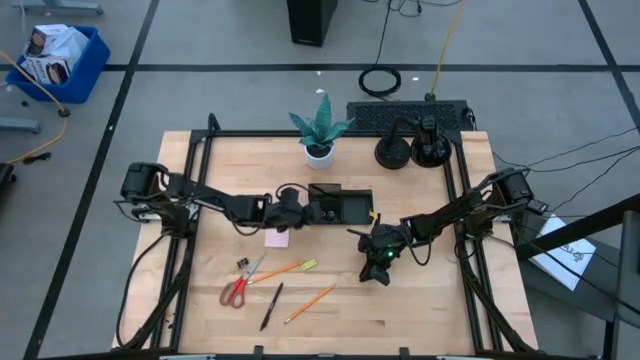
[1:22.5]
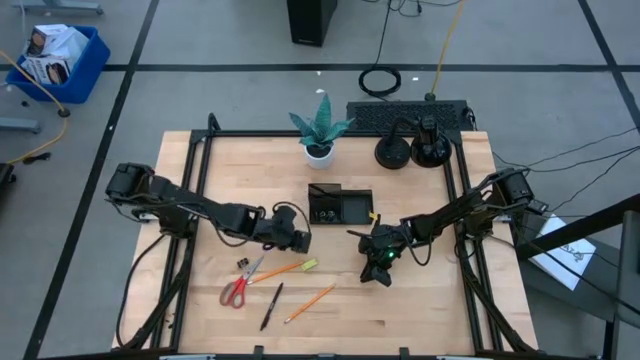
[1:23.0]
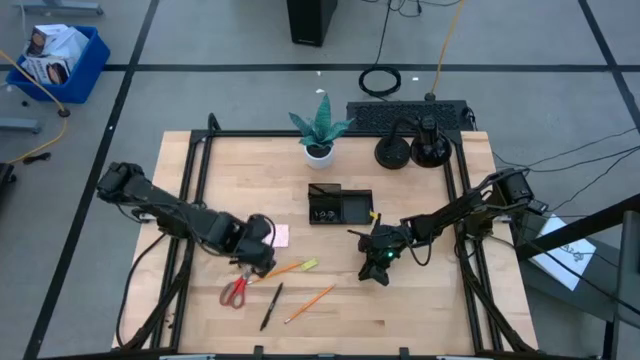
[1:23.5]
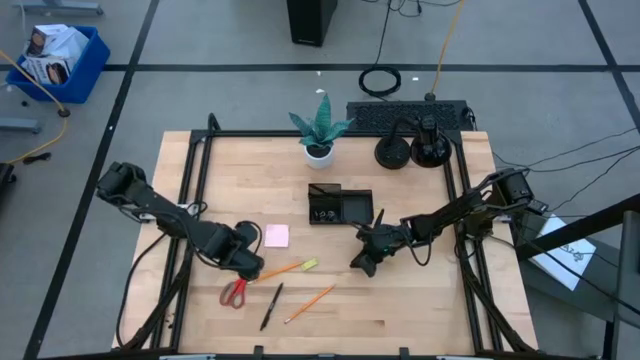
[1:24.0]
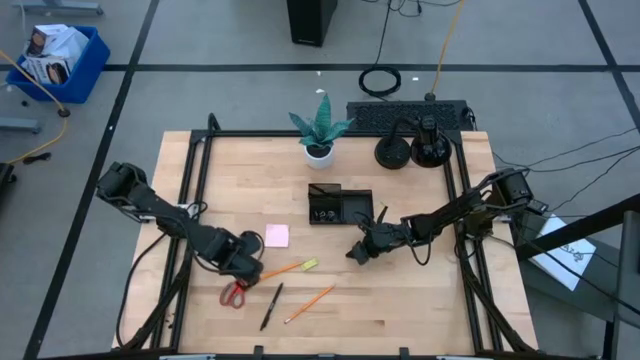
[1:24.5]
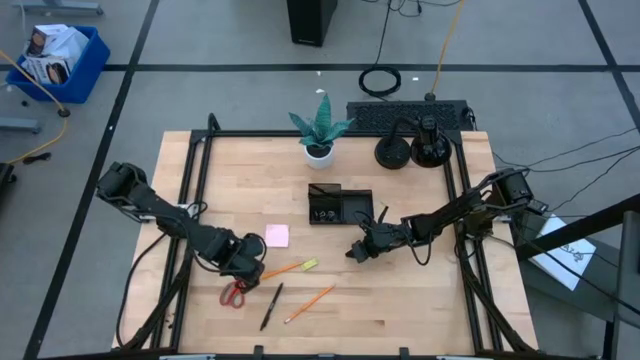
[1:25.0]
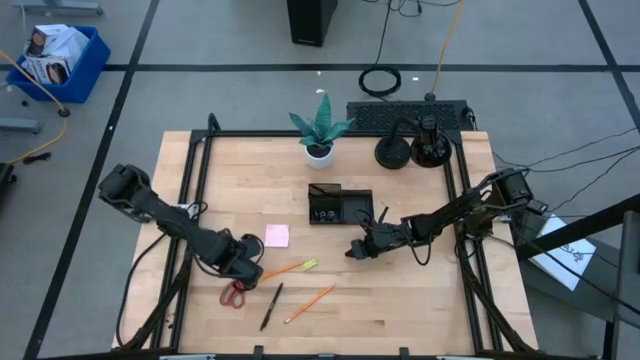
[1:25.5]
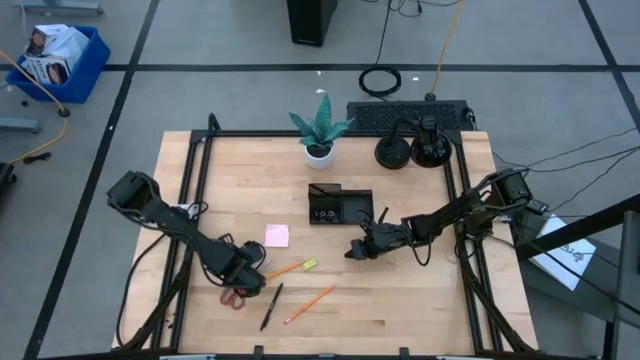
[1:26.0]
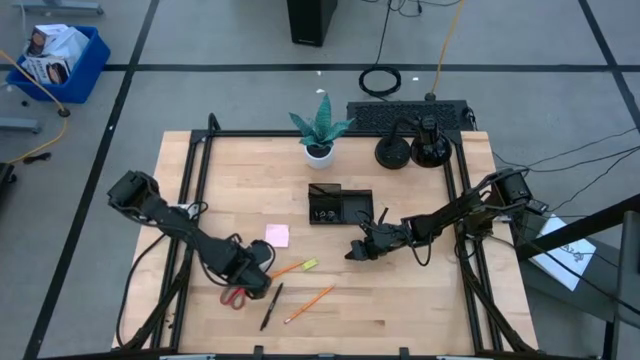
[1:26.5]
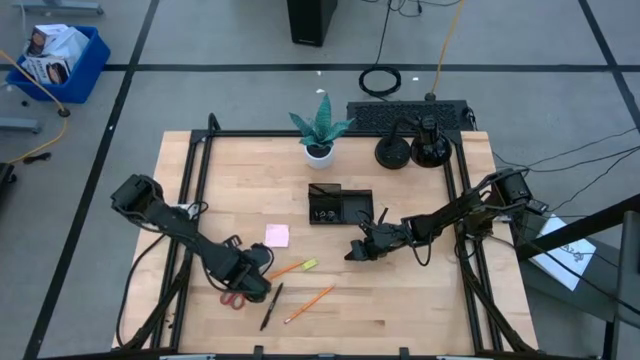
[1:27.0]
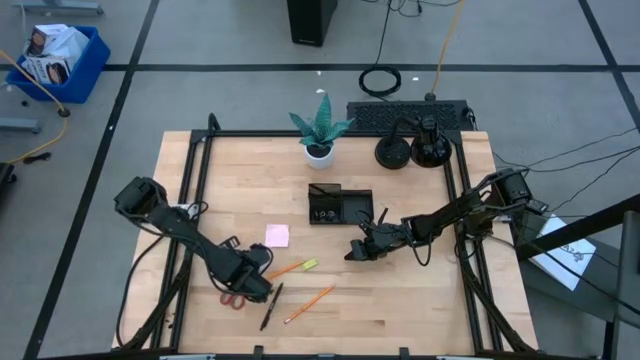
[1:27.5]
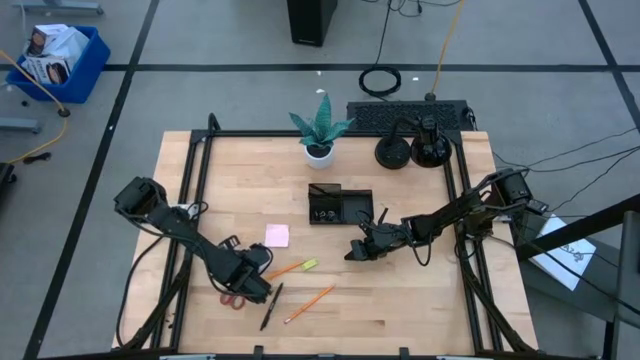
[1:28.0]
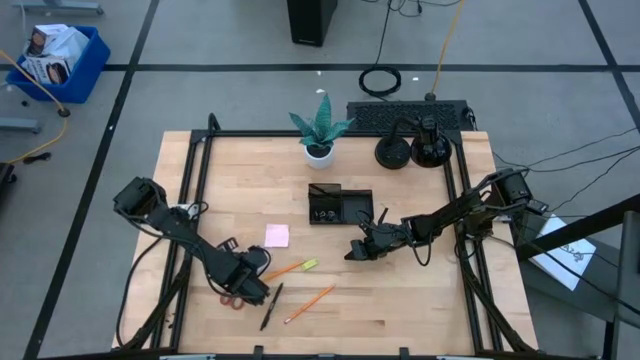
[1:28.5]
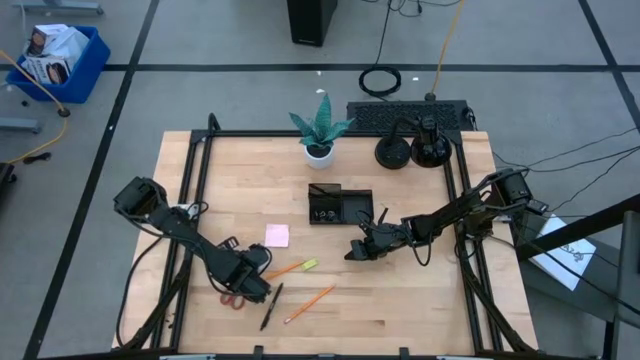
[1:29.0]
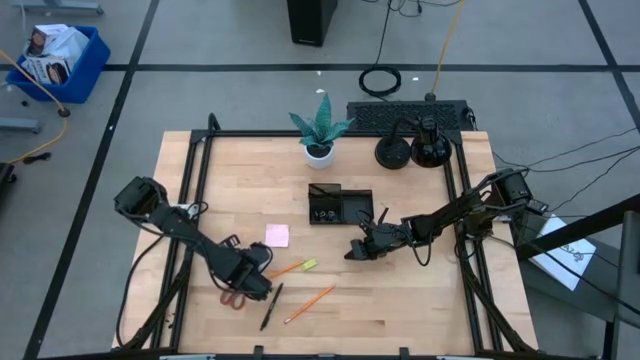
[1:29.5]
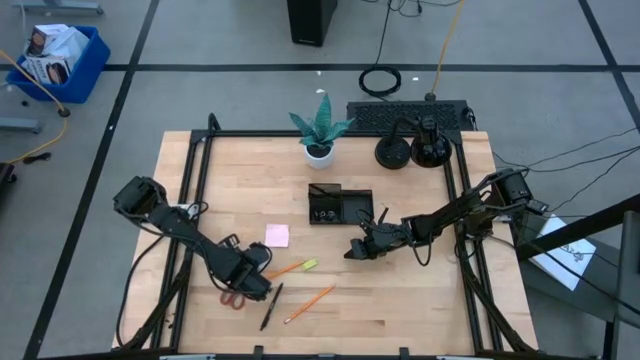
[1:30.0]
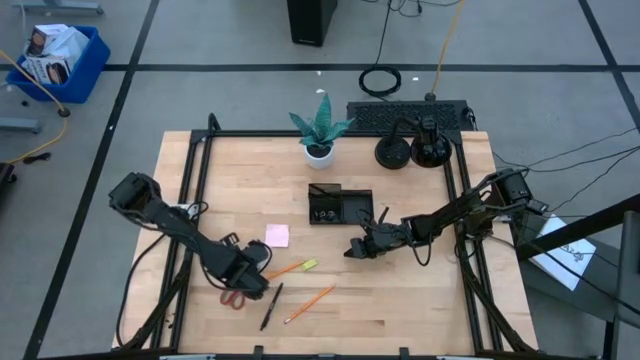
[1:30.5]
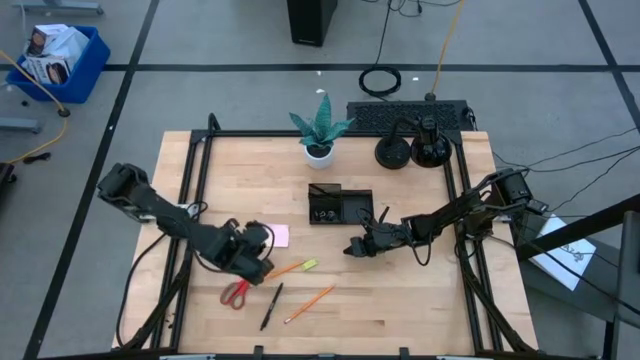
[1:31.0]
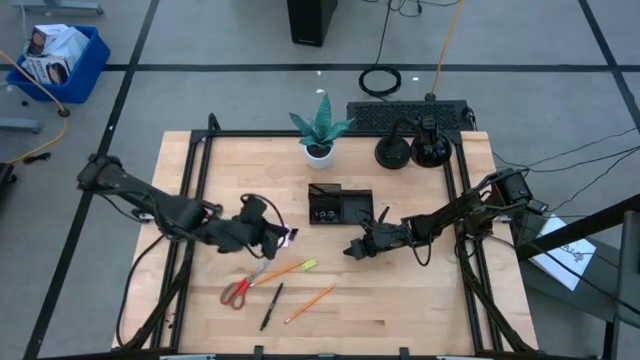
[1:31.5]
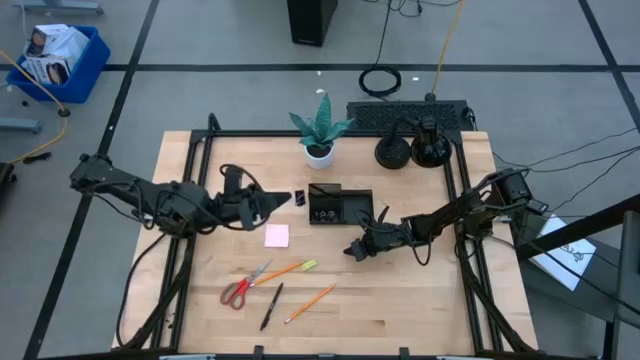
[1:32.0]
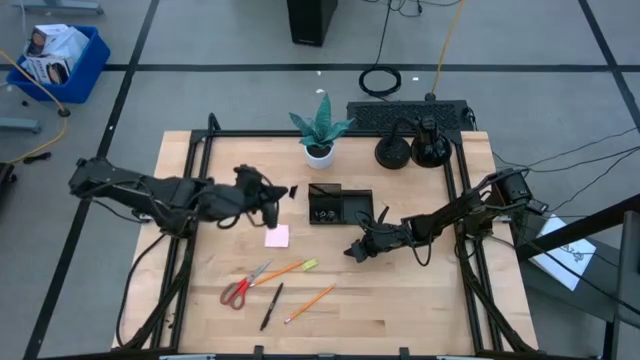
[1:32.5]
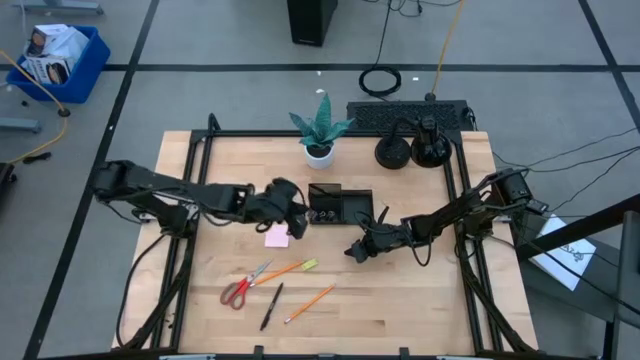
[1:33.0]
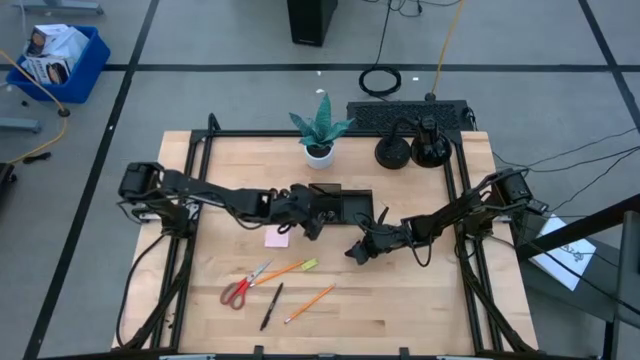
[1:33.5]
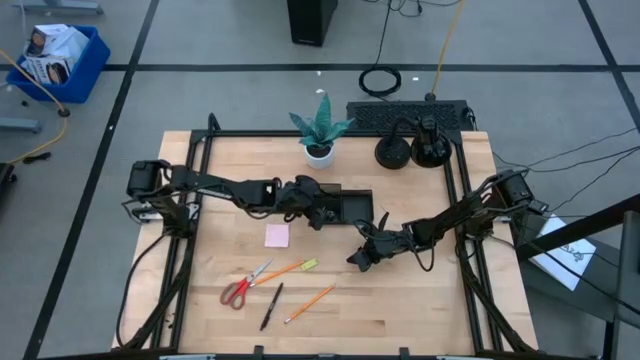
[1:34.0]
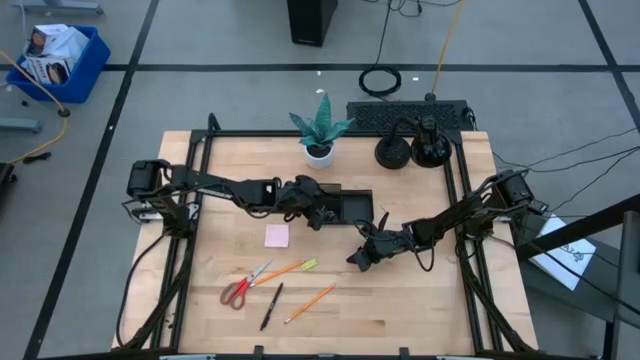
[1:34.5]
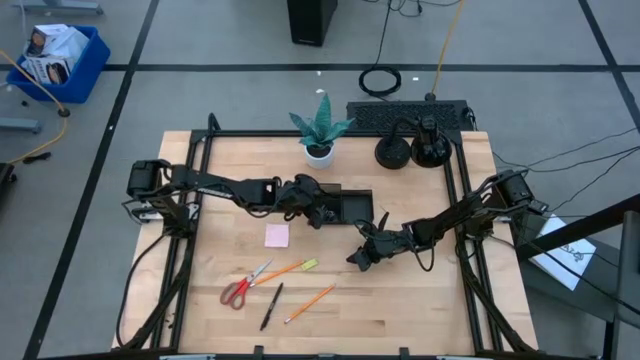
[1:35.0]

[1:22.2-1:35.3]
Task: Pick and place office supplies into organizer
Put the black binder clip into the black desk organizer

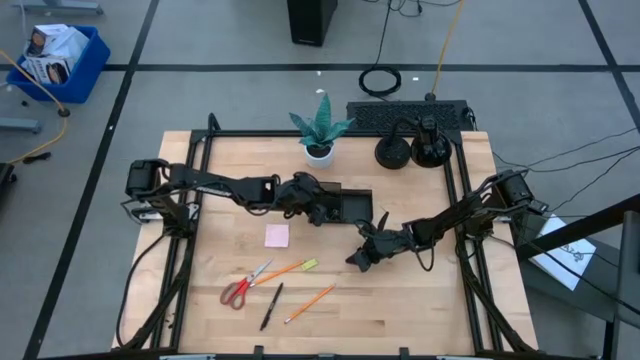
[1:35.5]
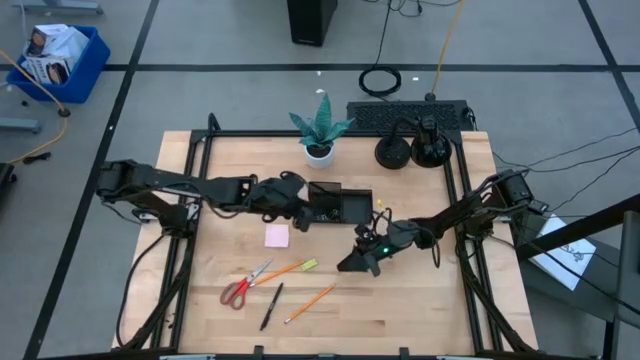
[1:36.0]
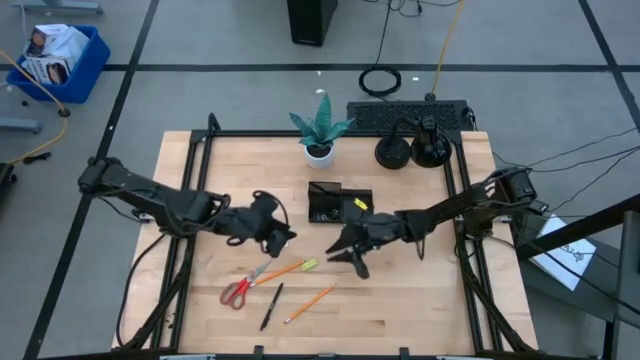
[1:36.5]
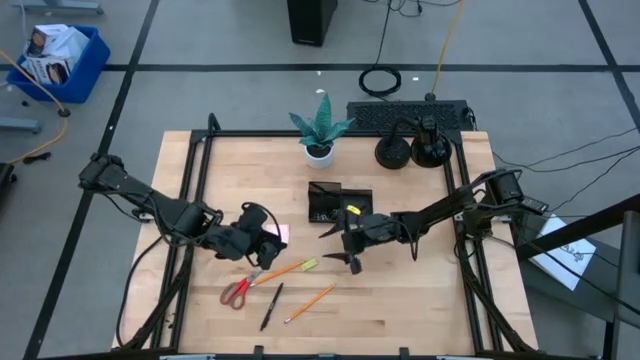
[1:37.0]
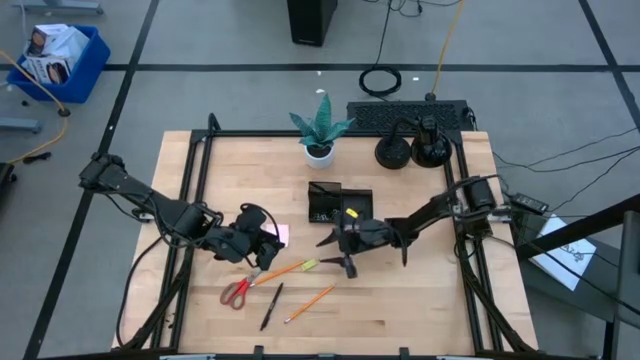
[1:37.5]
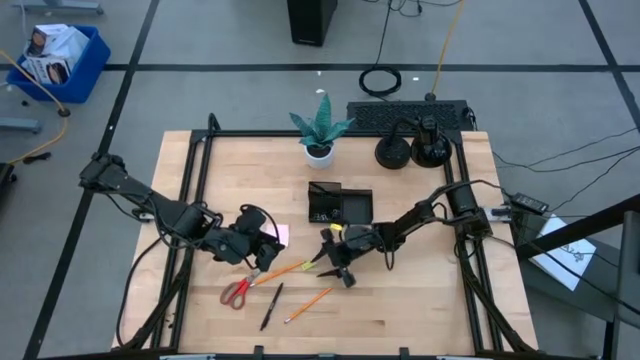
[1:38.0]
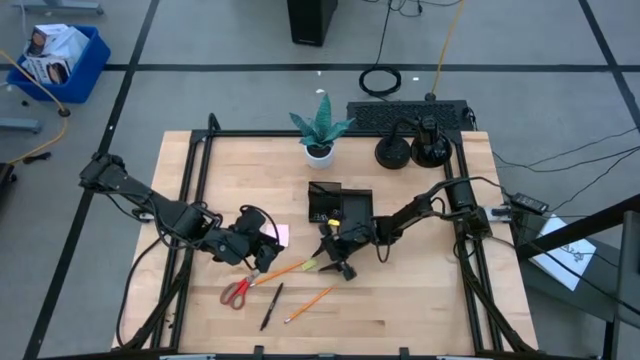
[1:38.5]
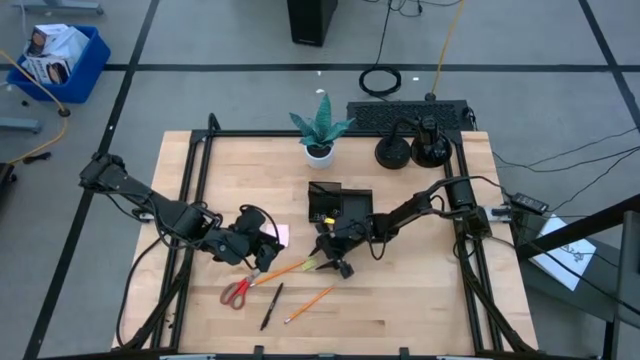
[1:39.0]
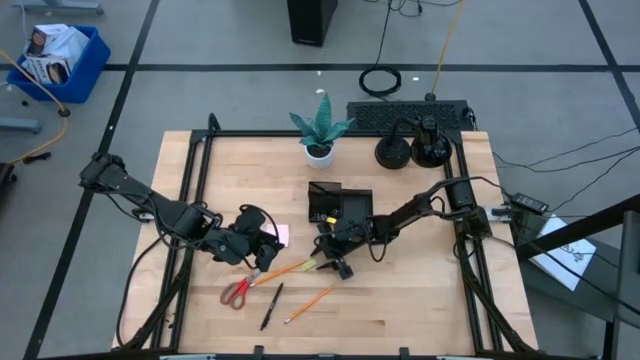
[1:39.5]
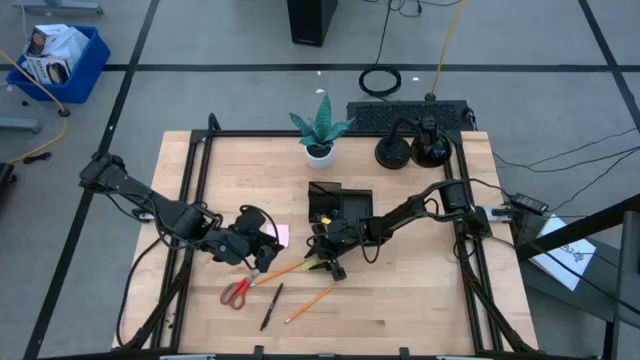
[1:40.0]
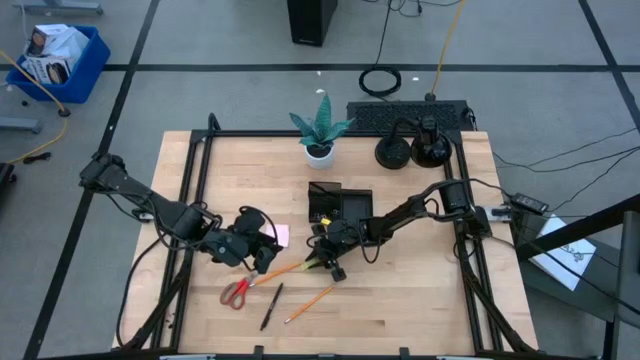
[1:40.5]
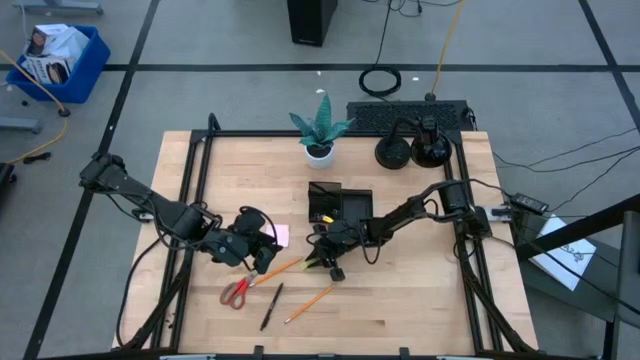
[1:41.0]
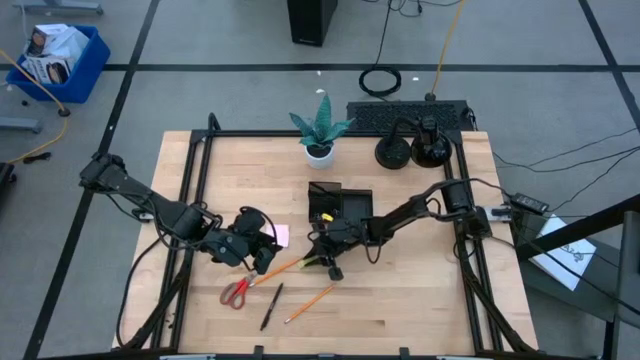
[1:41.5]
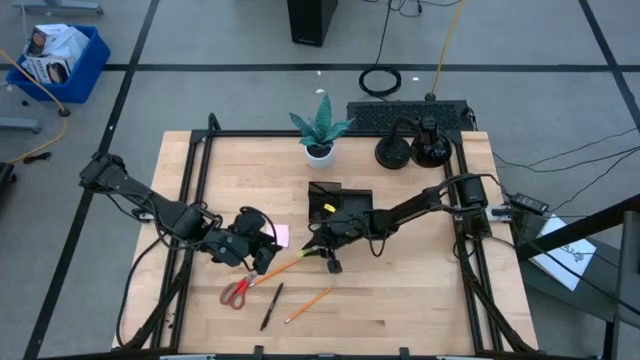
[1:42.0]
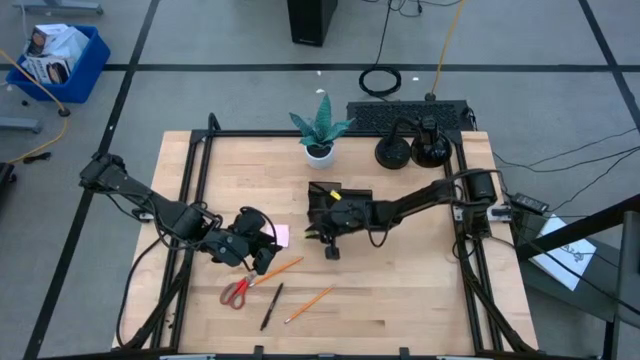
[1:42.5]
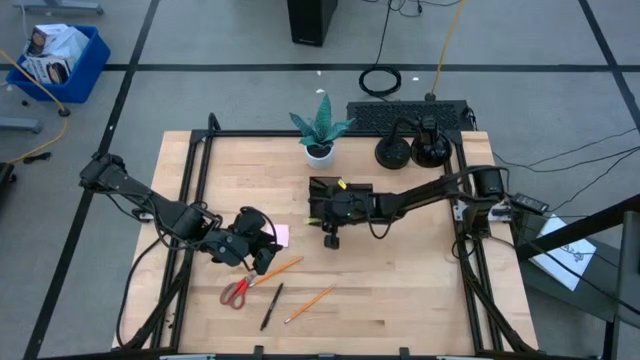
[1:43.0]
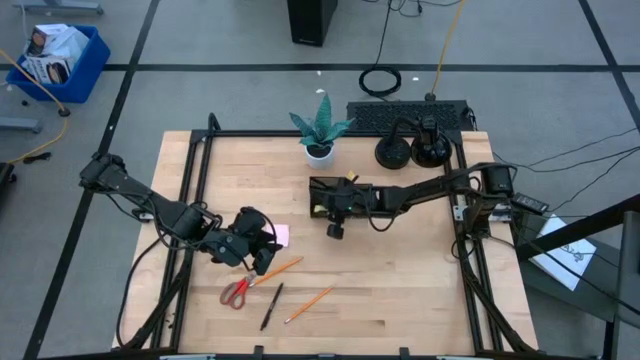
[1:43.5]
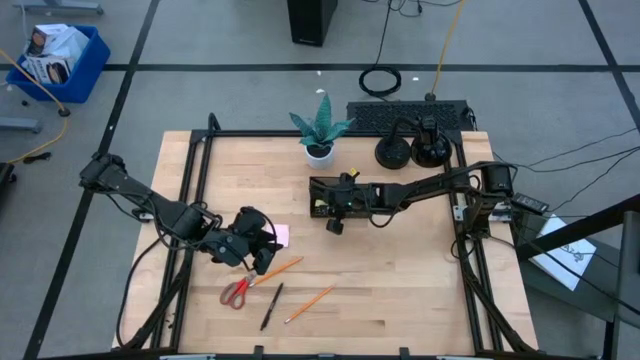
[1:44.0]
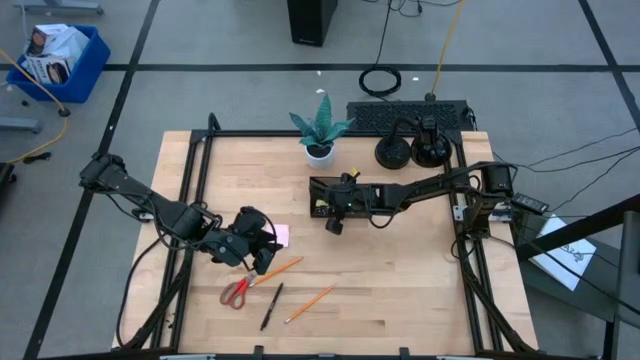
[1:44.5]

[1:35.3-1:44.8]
Put the light green eraser into the black desk organizer
